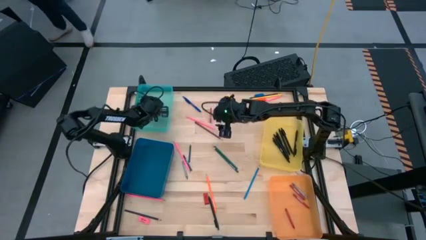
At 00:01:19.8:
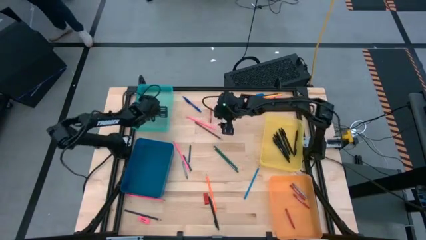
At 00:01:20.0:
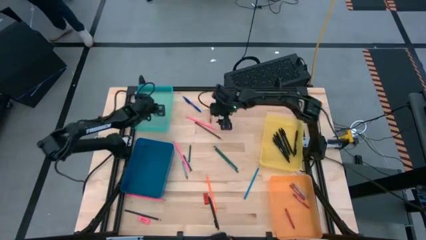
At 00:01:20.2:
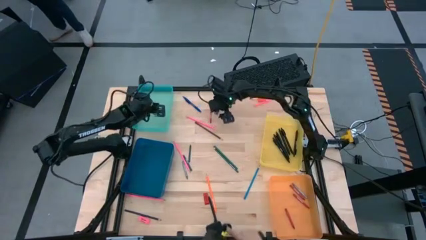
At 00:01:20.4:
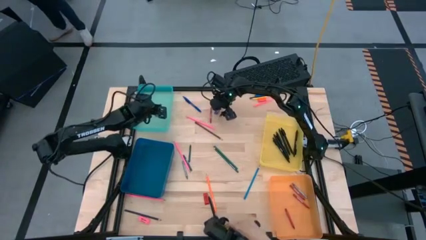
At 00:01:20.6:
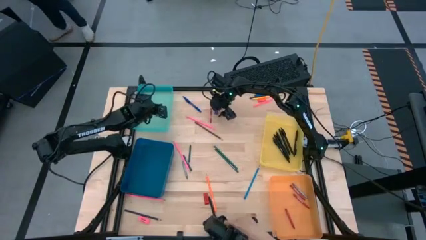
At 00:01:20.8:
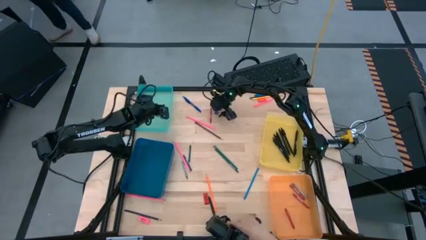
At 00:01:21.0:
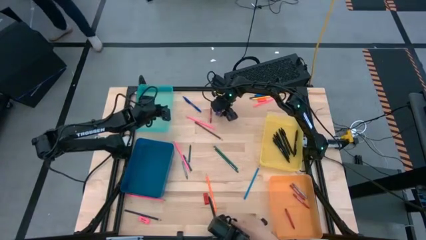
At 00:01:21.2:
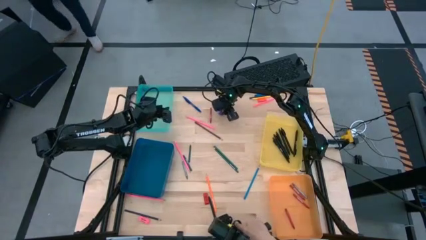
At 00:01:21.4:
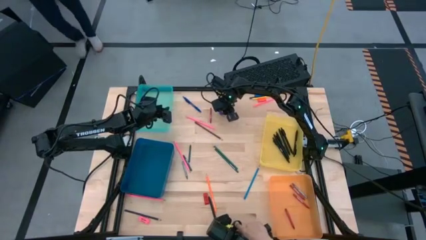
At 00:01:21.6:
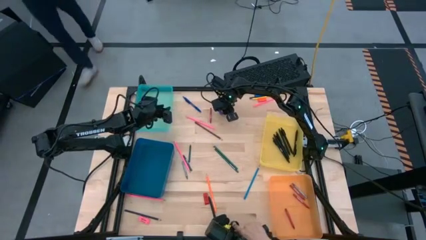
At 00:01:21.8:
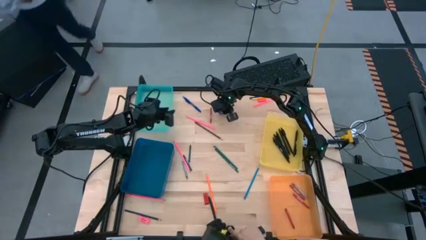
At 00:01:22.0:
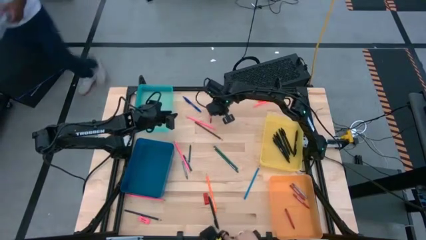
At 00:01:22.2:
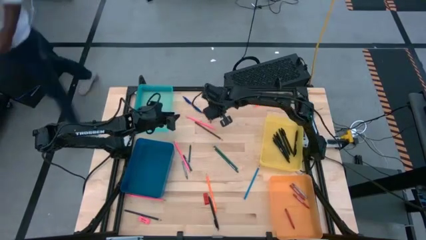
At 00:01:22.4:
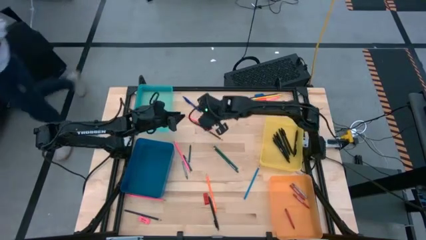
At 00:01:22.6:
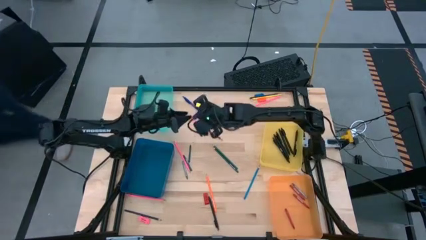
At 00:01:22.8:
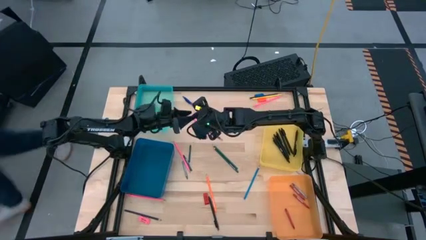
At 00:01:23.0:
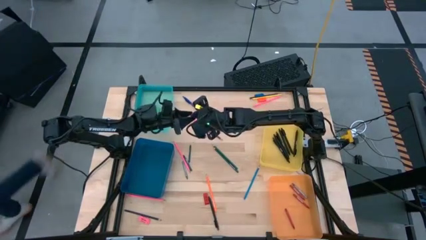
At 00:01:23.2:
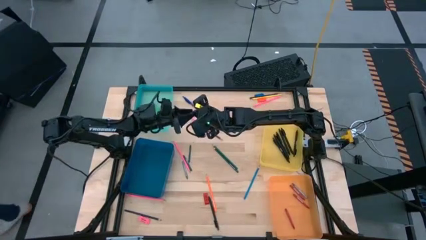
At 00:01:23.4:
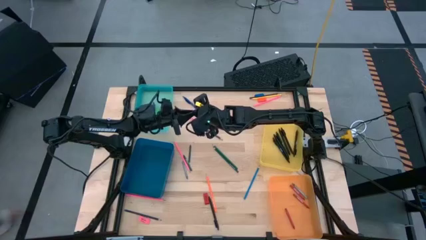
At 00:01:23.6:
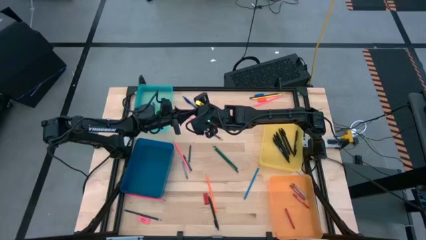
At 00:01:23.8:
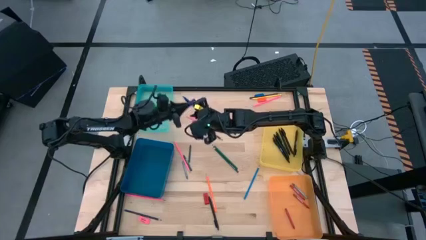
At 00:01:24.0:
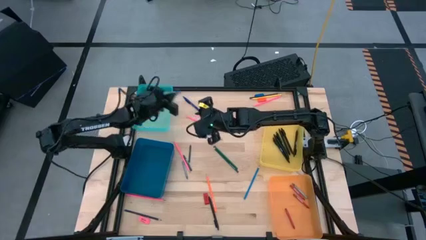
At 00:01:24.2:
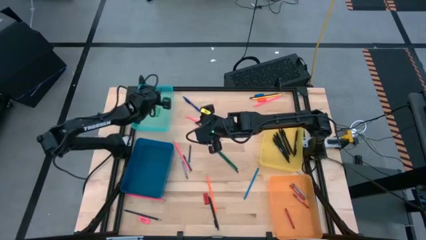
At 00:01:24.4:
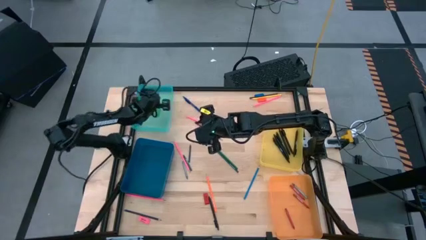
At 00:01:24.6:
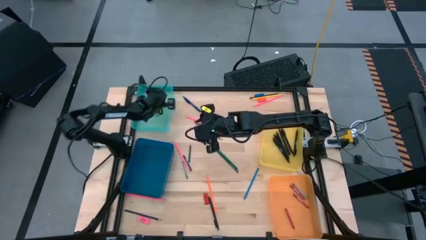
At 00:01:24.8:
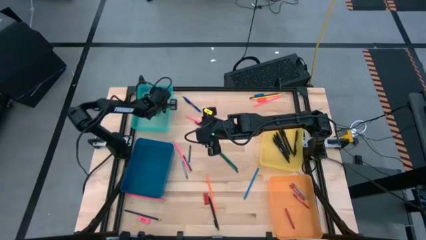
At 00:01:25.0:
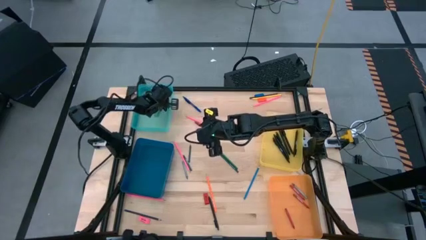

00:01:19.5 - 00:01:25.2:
Task: Sort crayons/erasers/pens/pencils in bins
Put the blue eraser into the light blue bin

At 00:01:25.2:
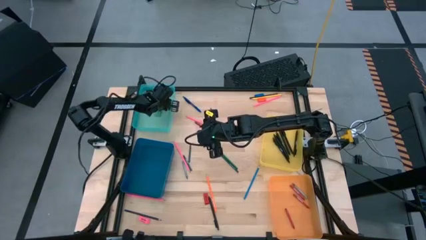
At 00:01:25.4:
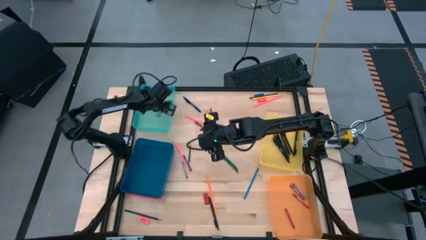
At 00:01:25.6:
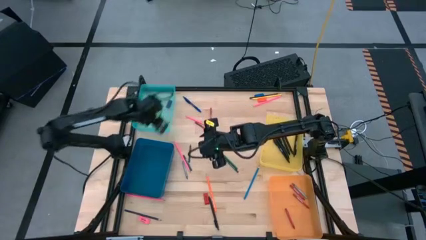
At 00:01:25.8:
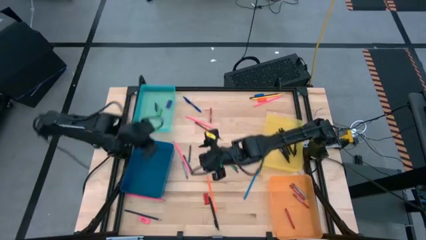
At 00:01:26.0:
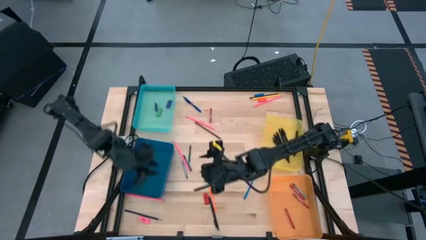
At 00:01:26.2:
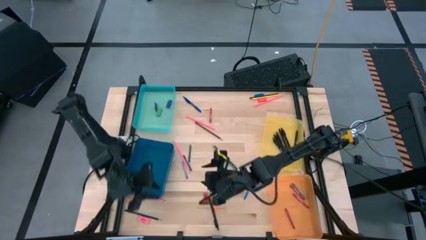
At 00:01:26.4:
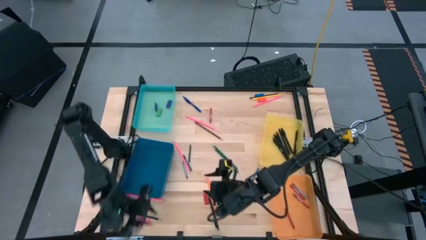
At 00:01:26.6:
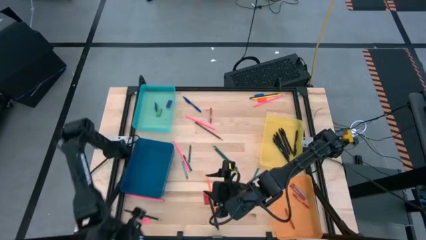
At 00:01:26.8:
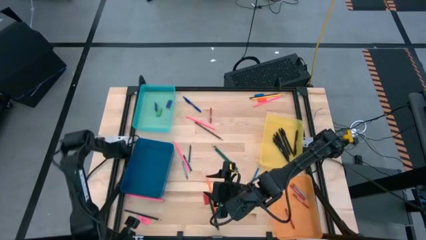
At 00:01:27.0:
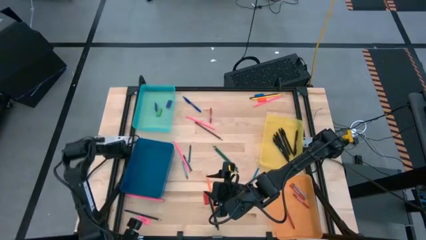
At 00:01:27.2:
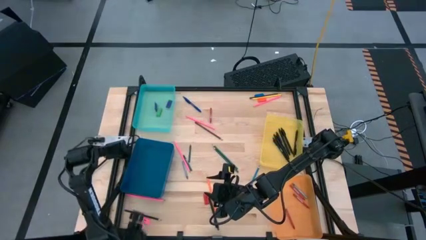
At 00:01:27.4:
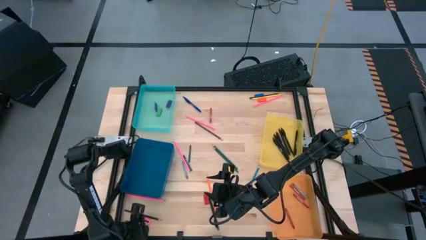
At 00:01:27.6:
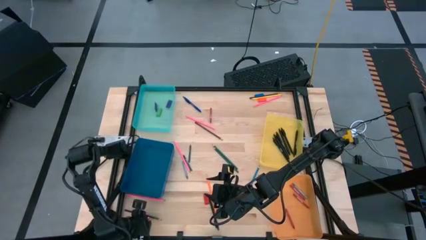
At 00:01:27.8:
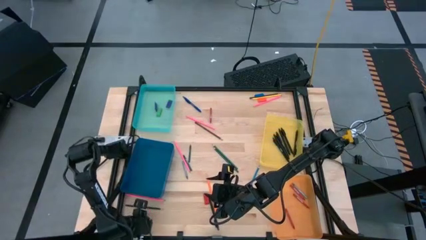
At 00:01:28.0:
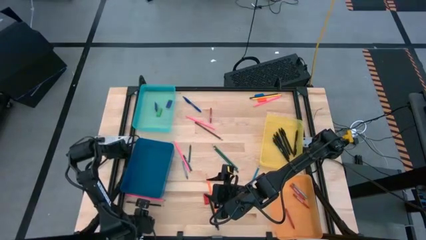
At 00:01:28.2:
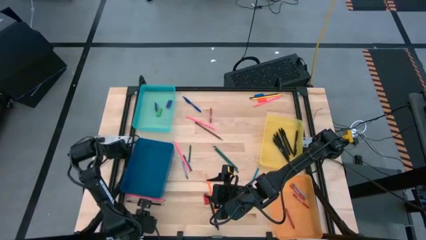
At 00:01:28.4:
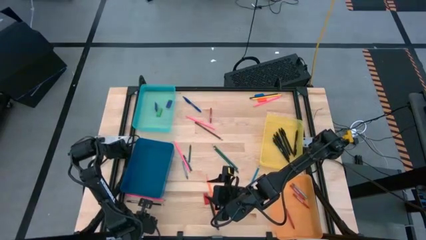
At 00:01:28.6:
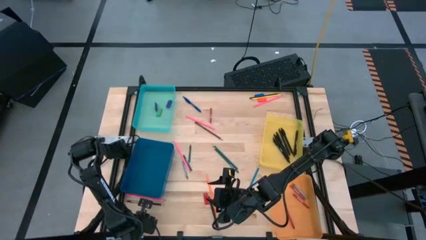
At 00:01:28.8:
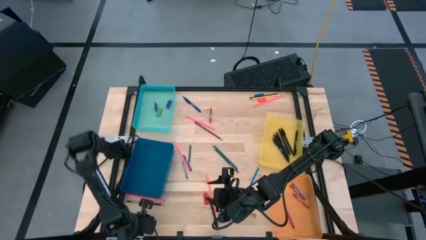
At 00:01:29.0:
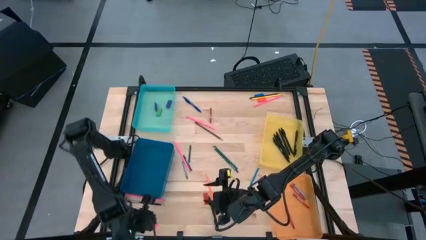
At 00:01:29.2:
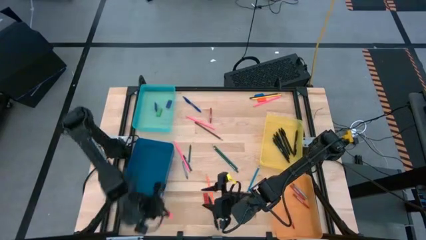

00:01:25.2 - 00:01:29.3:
Put the pink eraser into the light blue bin

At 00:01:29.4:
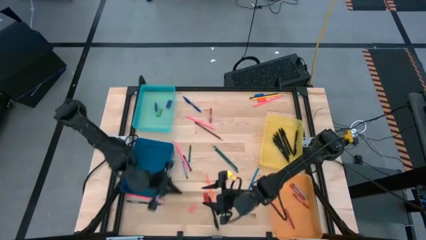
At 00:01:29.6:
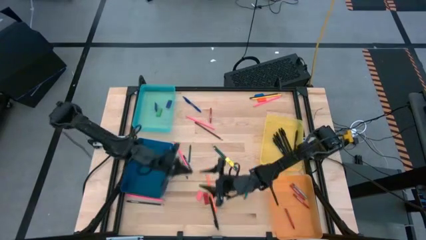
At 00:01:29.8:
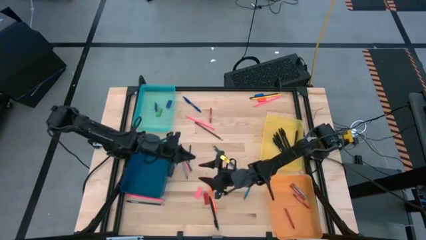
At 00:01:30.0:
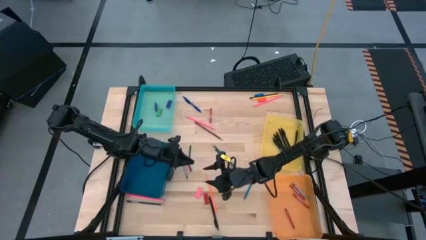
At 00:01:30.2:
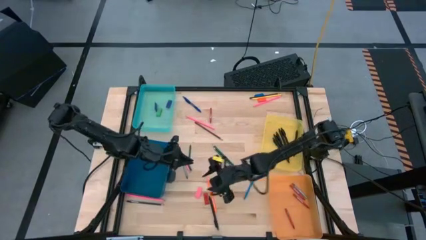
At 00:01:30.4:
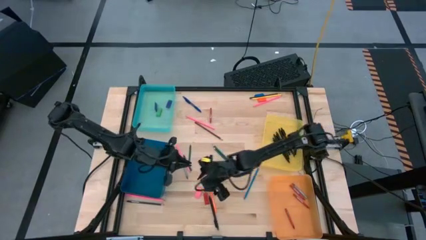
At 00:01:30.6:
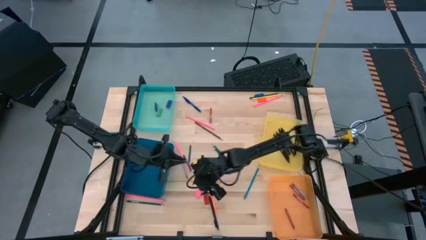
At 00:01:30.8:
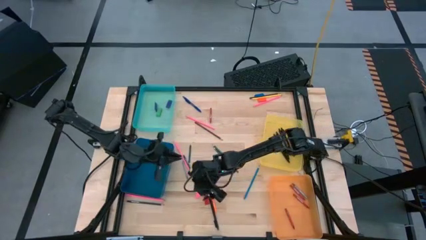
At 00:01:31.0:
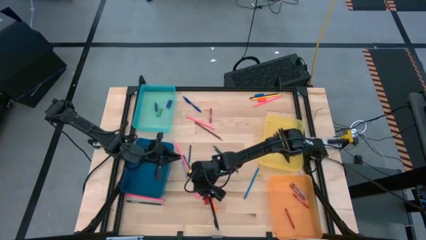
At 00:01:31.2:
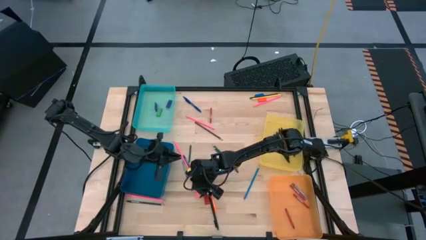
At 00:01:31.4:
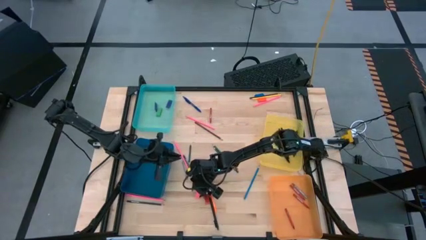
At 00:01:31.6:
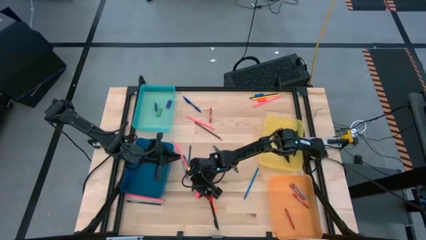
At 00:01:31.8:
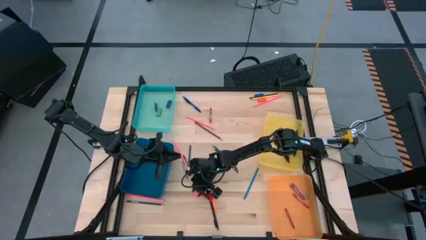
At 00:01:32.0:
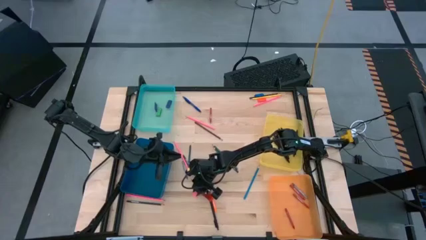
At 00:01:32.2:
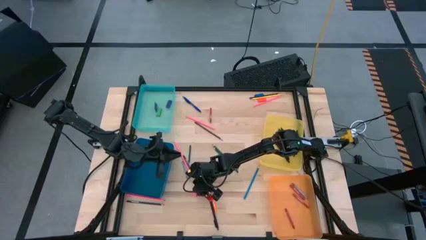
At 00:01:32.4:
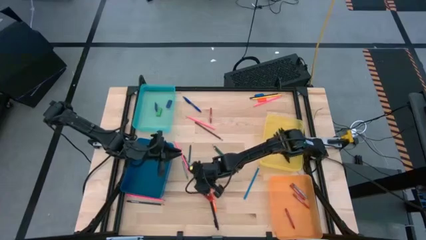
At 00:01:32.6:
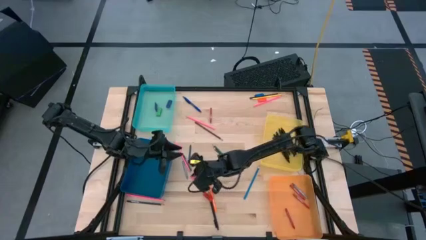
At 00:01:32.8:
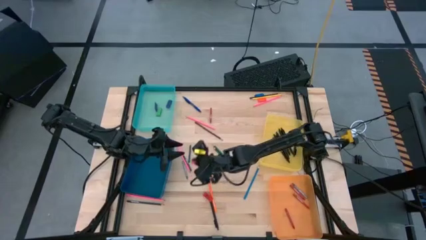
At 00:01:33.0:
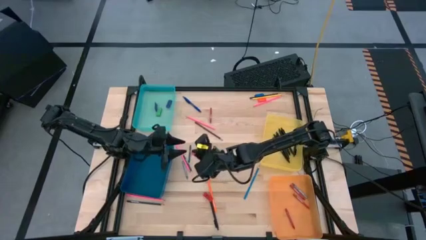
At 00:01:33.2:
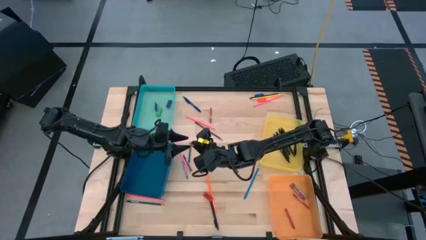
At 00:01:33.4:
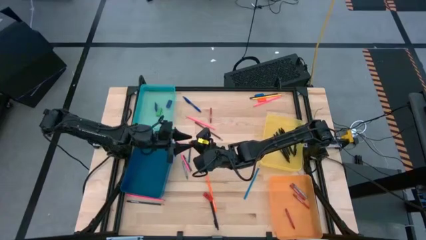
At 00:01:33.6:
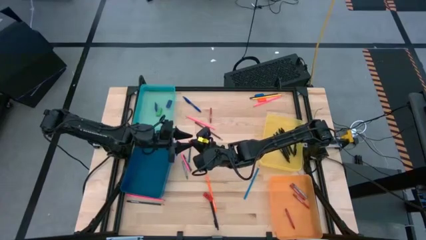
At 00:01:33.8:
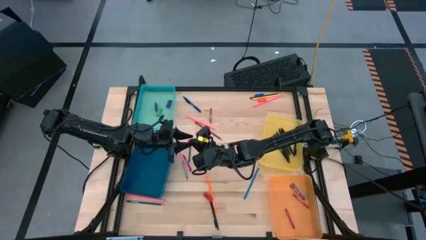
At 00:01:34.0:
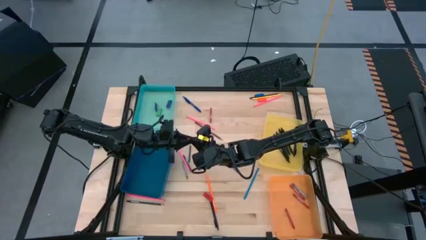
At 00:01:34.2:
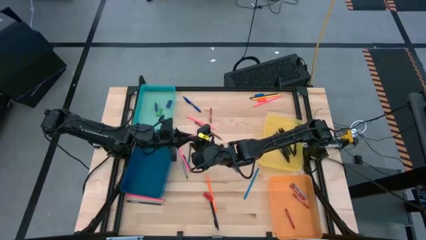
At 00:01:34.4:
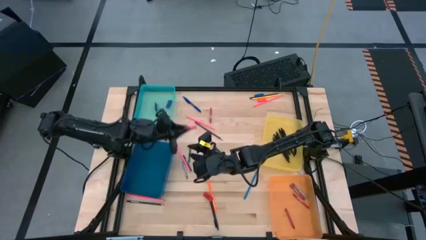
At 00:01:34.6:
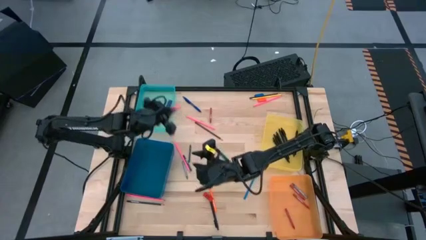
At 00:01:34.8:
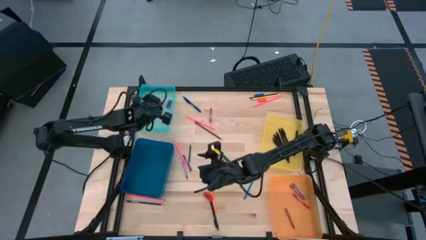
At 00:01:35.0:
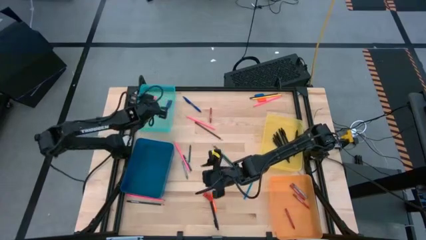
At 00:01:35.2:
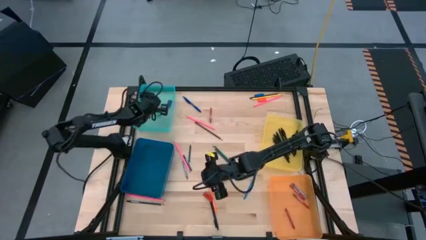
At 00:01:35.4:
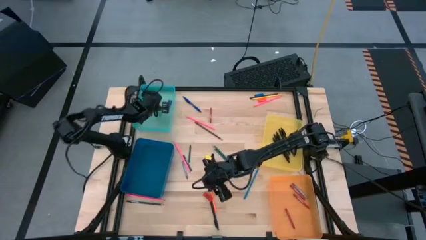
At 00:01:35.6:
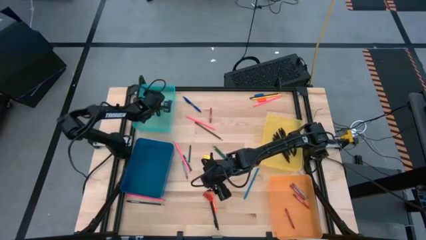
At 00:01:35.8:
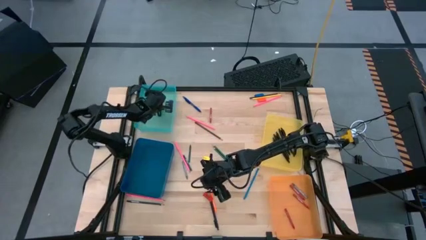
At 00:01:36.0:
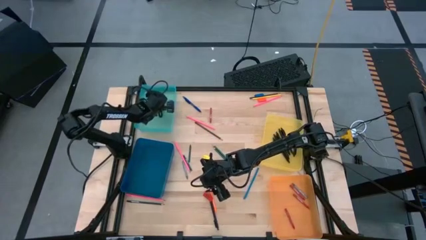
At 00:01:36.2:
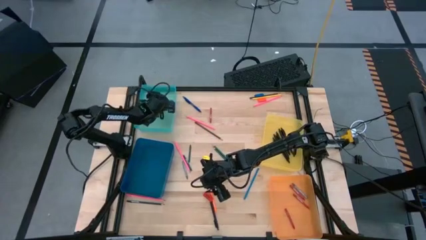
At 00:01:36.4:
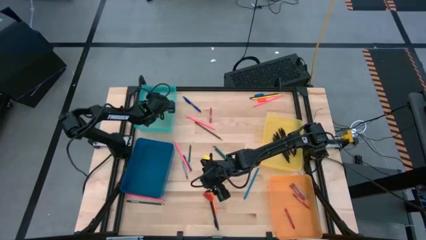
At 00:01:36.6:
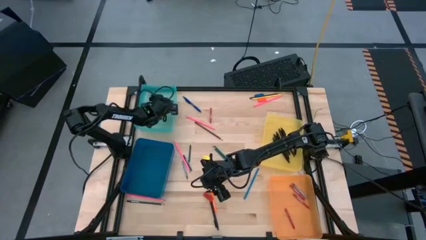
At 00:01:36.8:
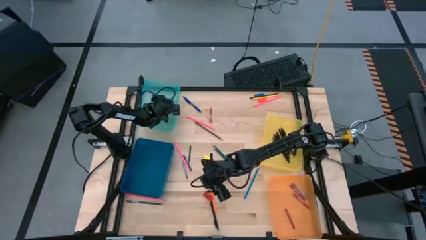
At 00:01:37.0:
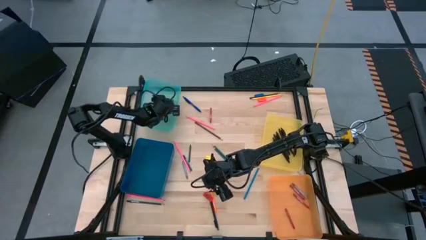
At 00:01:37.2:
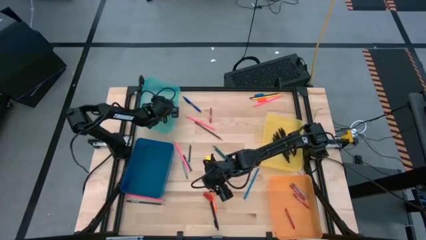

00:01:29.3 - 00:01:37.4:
Put the pink eraser into the light blue bin
